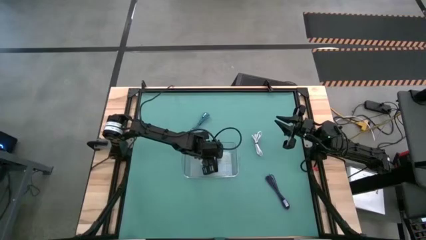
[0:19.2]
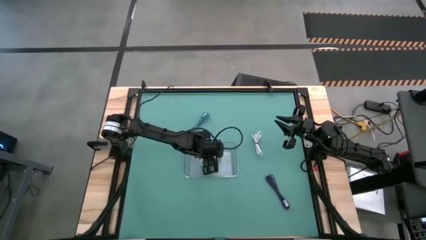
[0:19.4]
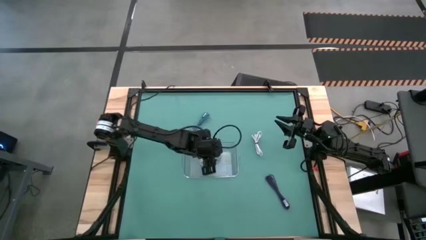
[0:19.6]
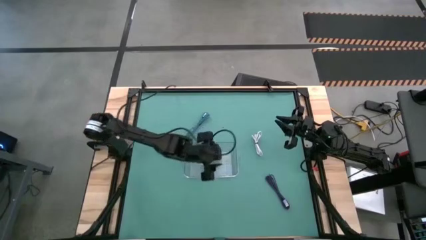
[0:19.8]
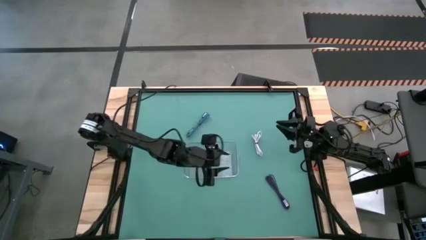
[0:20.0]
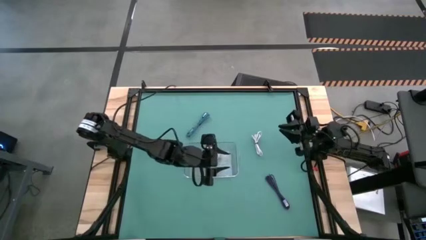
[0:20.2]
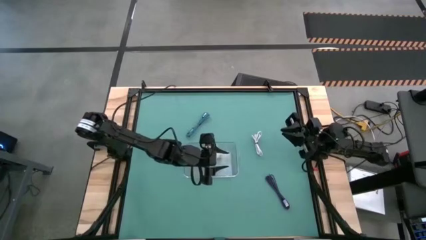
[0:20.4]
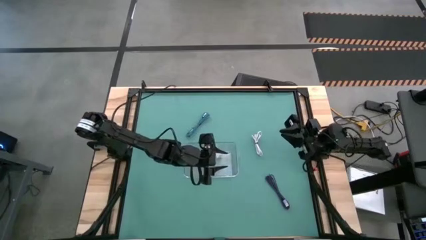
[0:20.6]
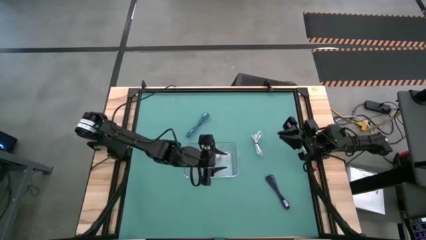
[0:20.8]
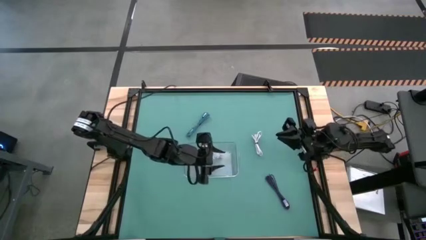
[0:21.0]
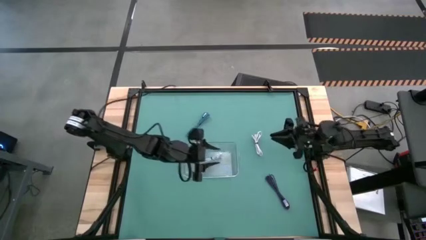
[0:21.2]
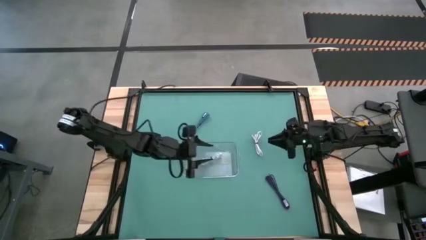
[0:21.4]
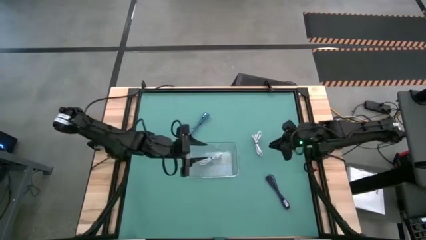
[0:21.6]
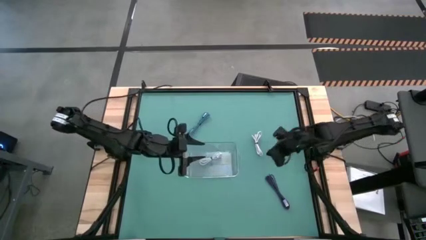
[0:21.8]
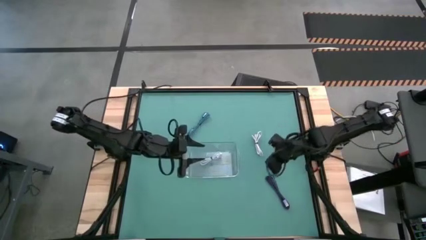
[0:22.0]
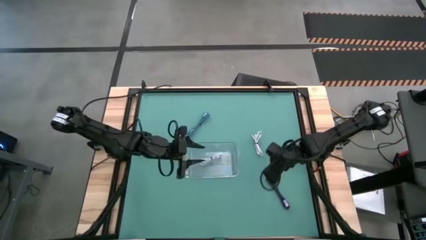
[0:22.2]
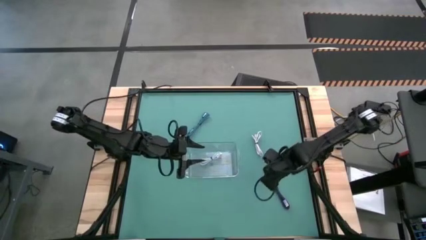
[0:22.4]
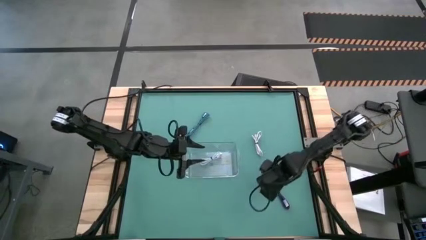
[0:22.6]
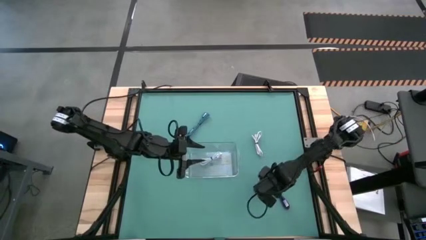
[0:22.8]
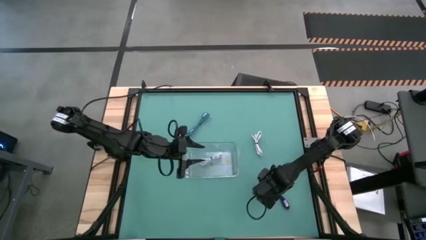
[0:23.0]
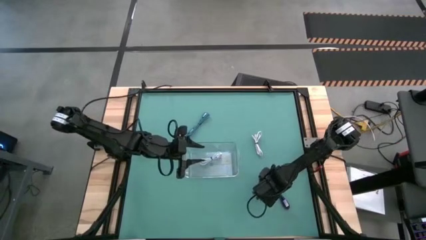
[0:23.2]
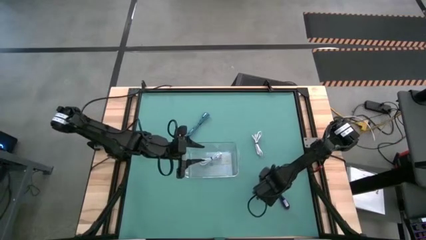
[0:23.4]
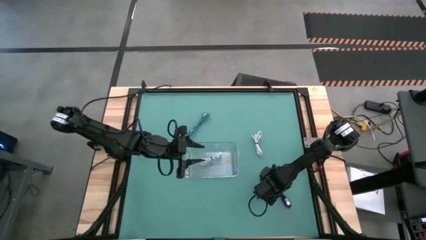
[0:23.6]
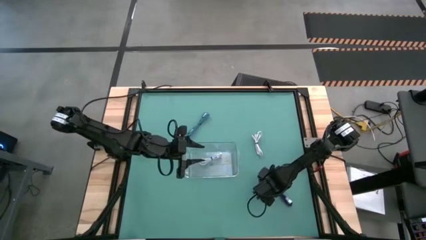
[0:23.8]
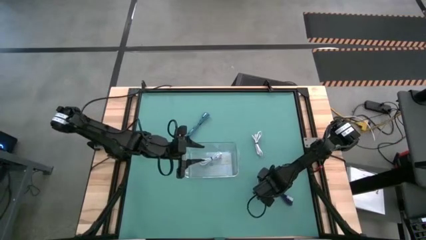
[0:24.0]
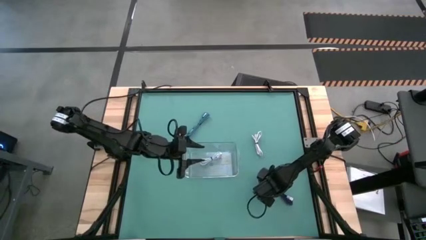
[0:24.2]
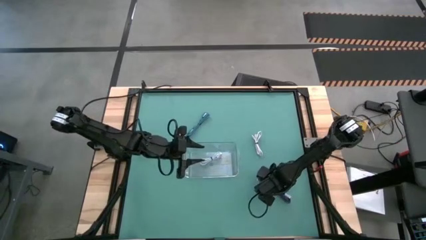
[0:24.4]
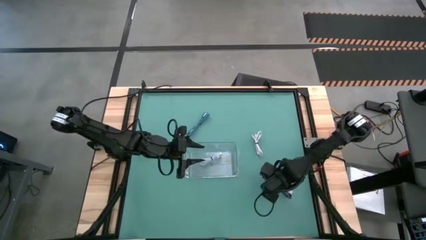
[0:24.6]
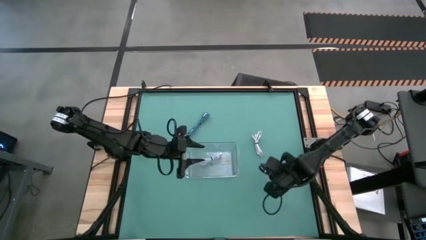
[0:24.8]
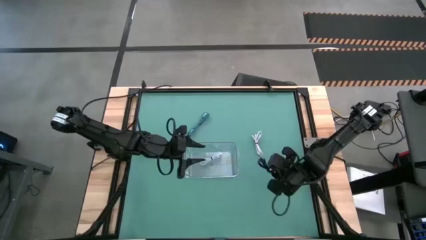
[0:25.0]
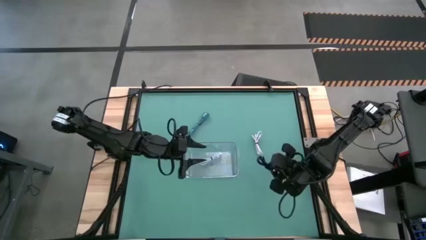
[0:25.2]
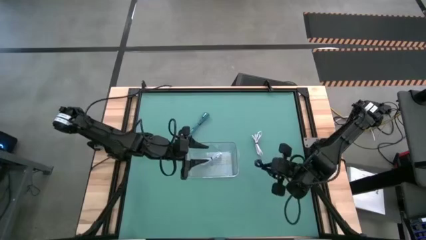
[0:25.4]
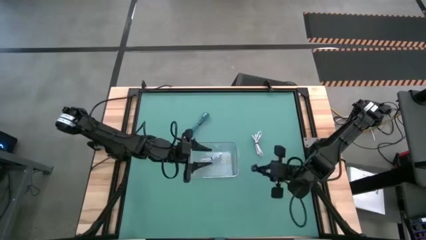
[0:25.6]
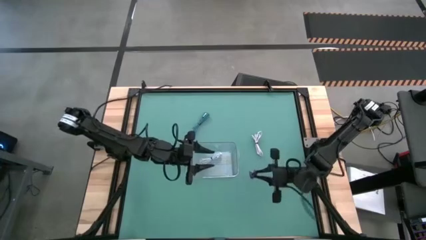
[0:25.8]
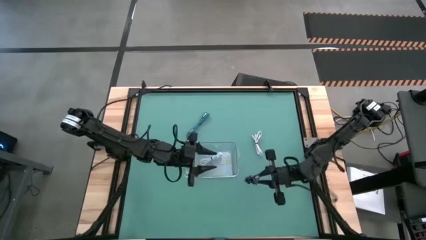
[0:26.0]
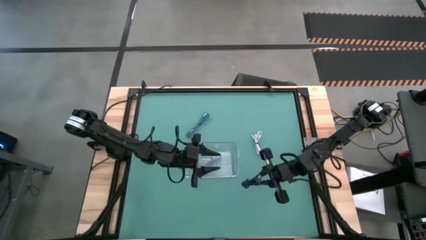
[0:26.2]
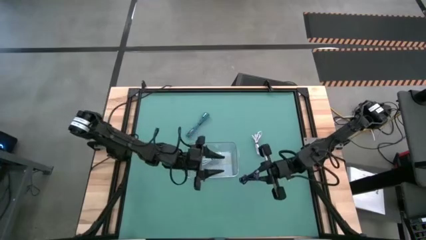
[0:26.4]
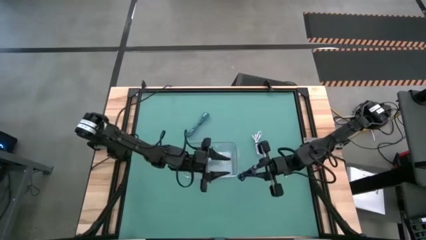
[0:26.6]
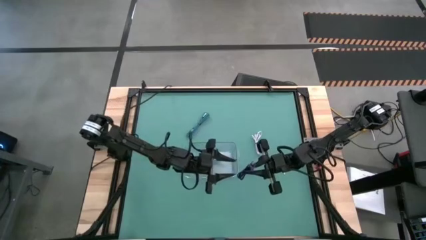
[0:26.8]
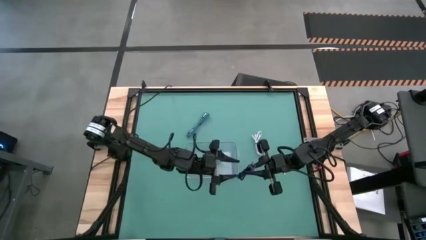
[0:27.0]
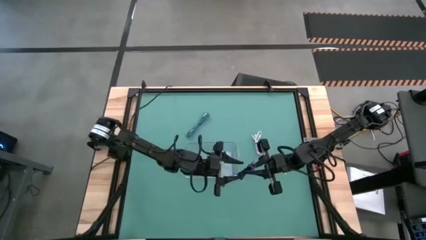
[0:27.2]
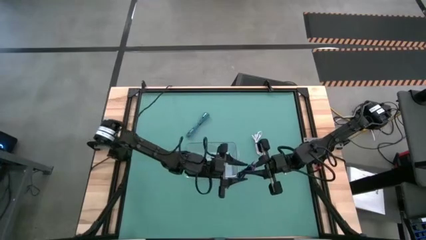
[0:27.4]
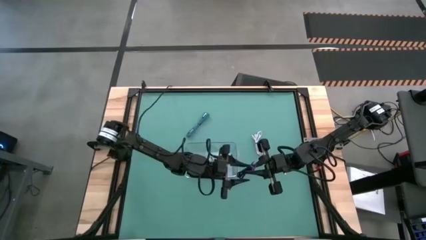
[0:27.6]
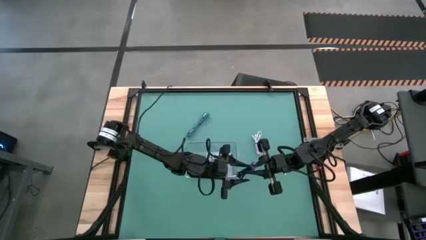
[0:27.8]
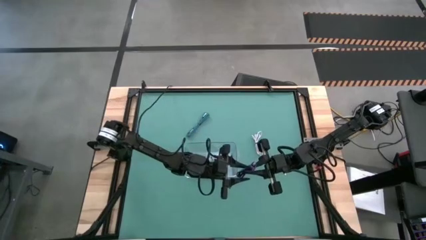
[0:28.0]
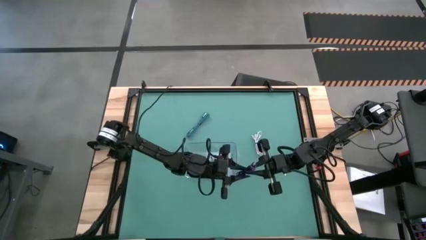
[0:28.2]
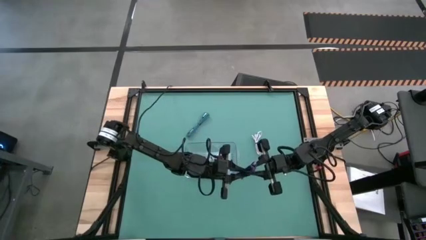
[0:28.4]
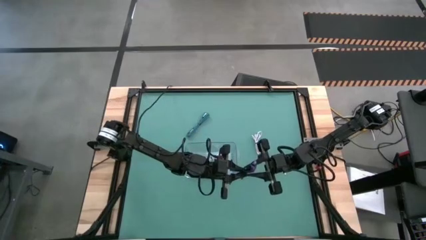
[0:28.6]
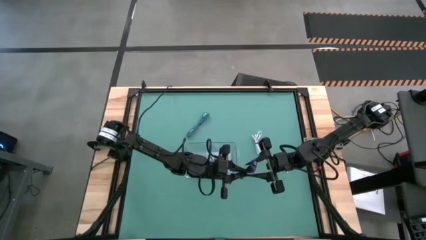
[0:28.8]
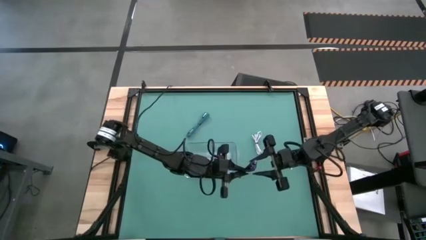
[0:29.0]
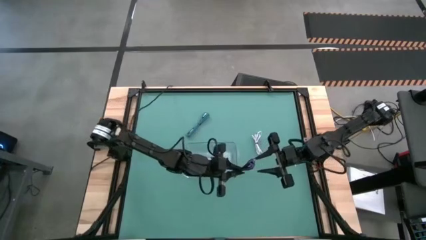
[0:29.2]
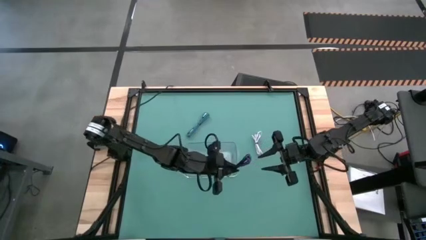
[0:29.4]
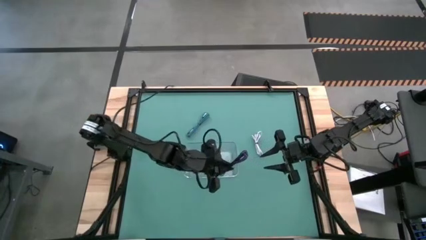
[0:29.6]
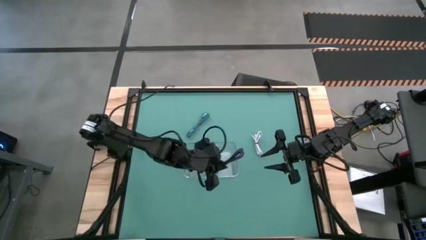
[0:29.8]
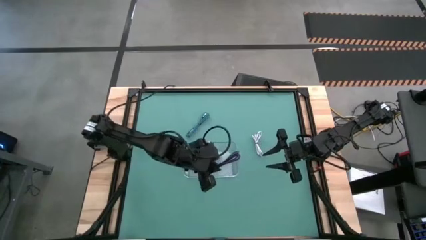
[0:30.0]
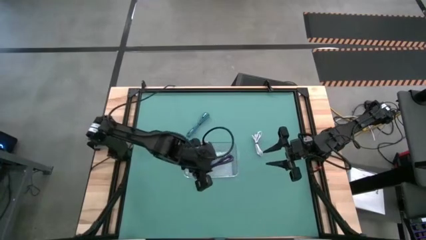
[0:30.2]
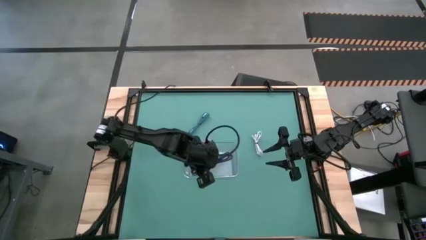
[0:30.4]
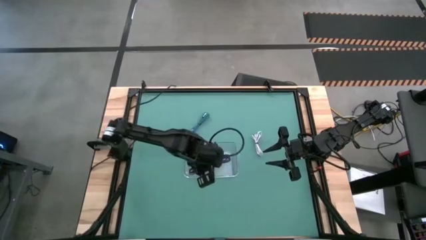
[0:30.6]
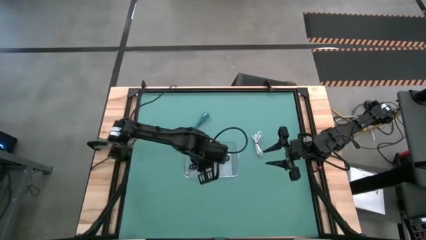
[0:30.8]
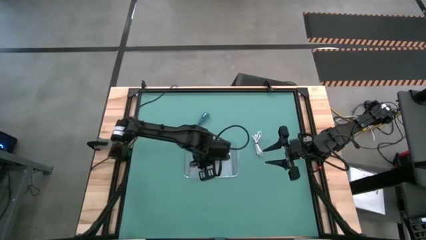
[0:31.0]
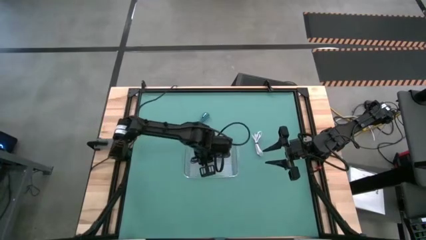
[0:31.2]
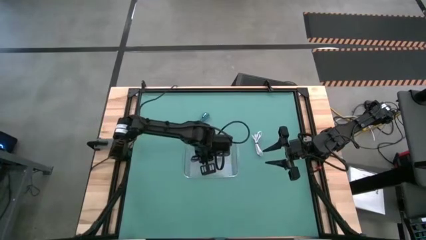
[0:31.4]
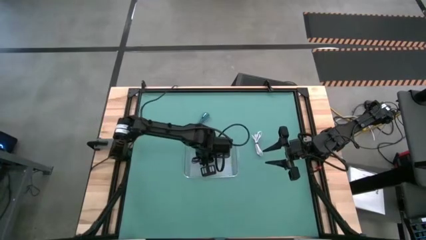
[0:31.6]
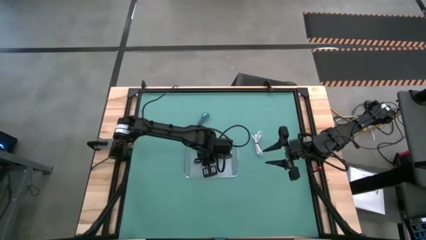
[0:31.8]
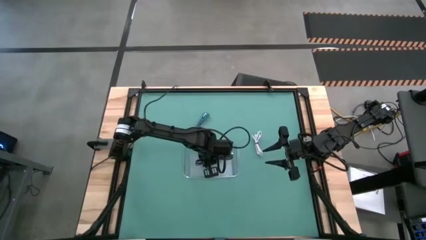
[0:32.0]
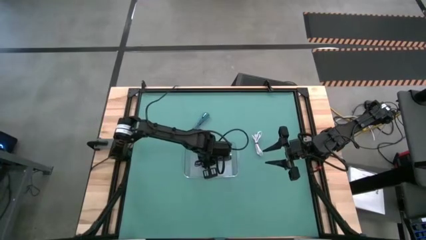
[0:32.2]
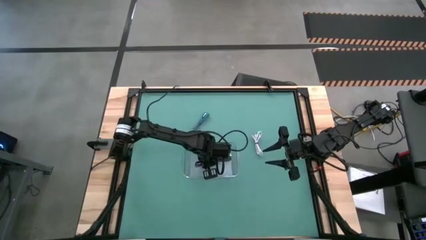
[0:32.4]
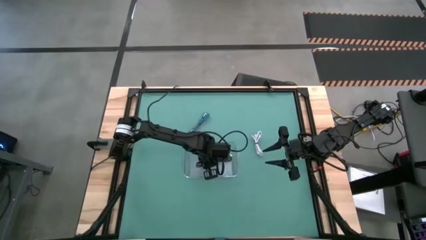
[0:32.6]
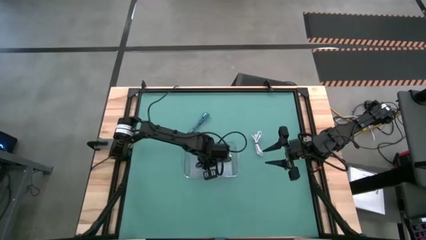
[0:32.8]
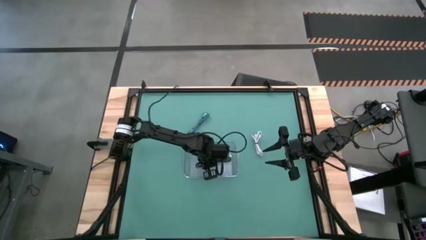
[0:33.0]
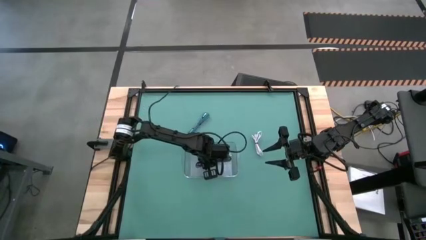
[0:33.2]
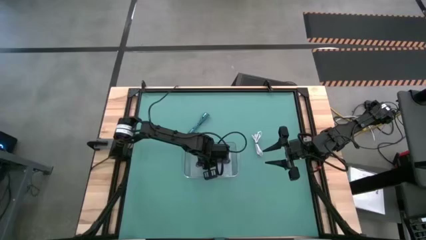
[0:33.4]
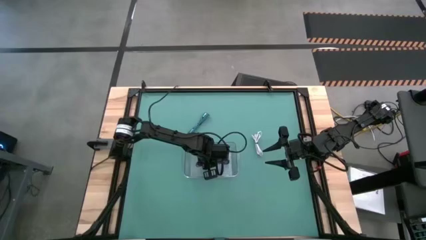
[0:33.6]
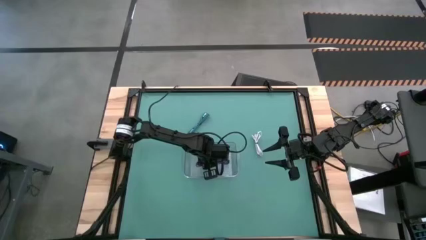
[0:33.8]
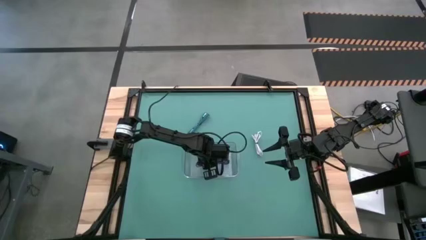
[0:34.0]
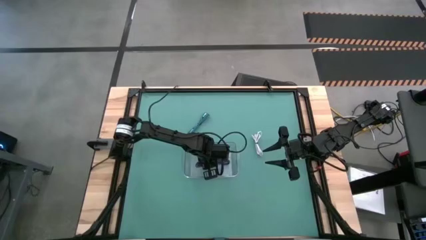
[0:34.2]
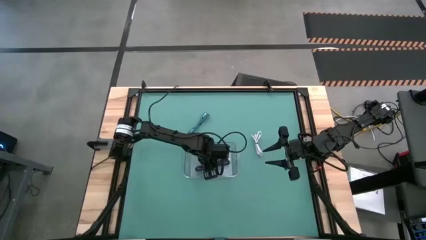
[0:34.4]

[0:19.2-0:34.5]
Task: Pick and place USB-C Cables
Put the violet charger cable into the transparent bin
